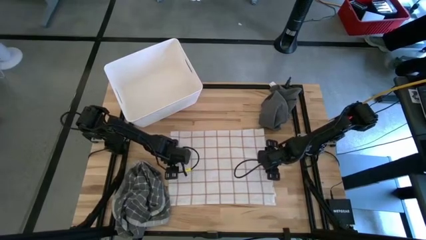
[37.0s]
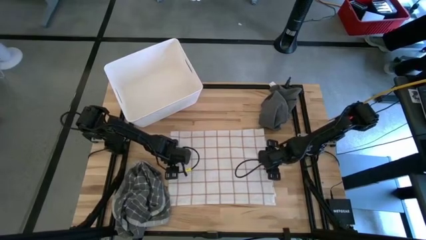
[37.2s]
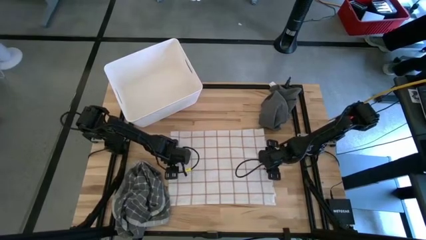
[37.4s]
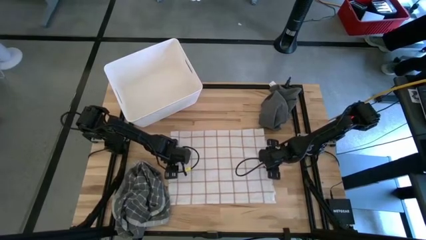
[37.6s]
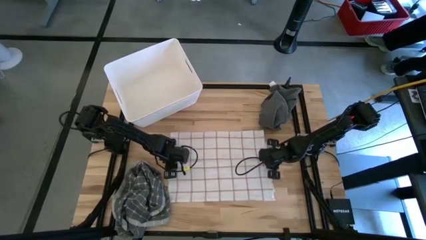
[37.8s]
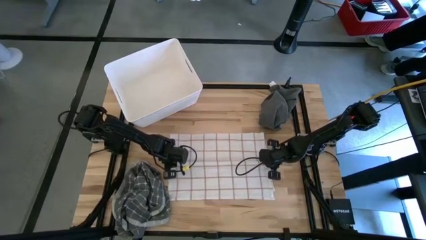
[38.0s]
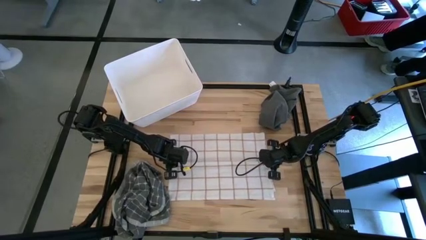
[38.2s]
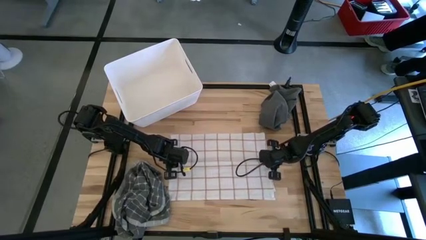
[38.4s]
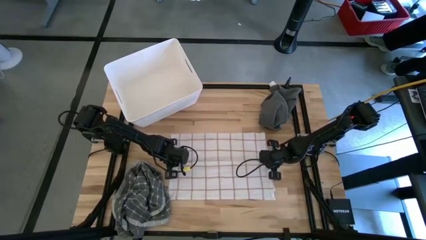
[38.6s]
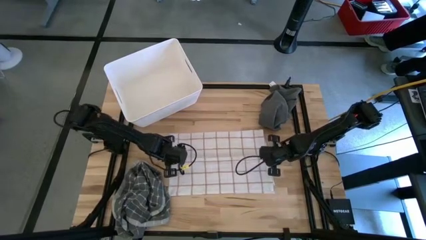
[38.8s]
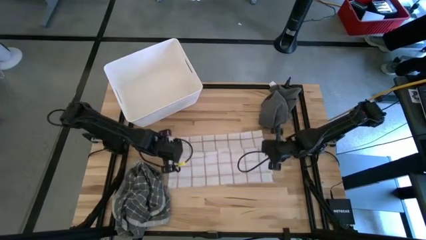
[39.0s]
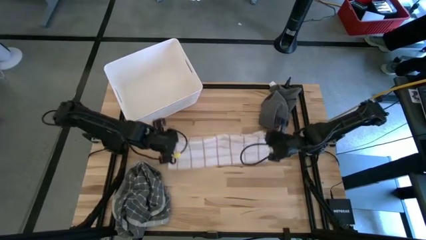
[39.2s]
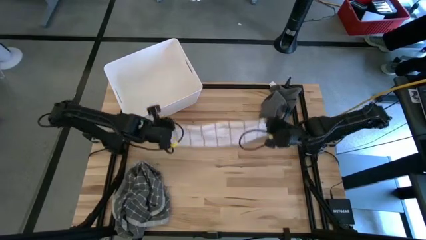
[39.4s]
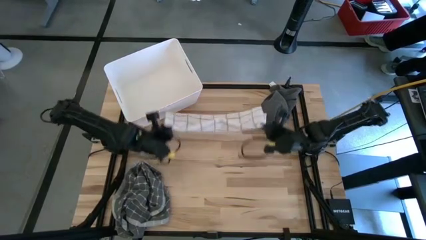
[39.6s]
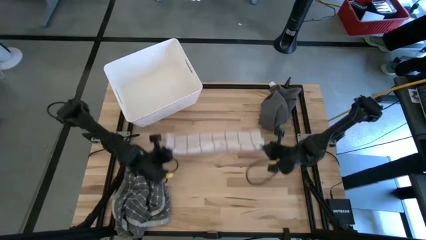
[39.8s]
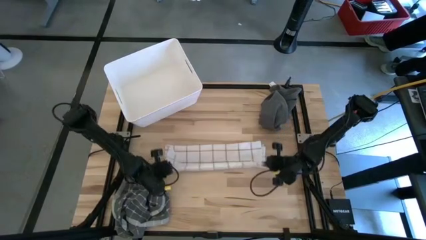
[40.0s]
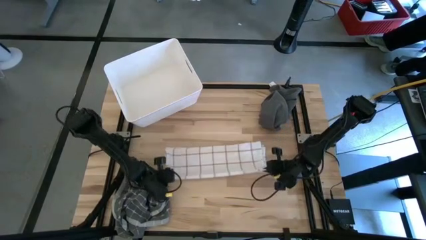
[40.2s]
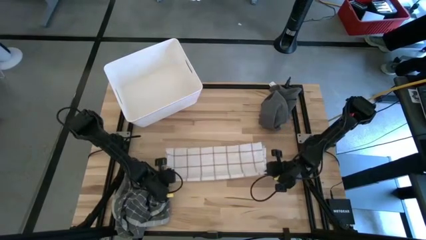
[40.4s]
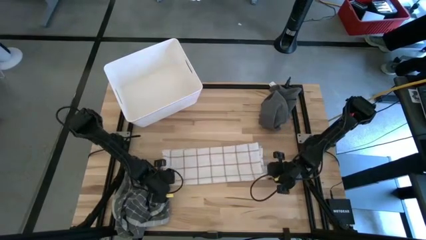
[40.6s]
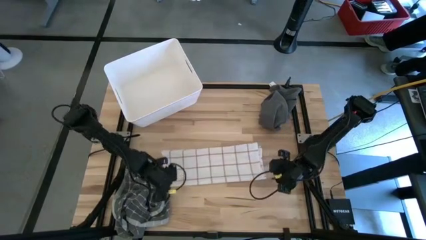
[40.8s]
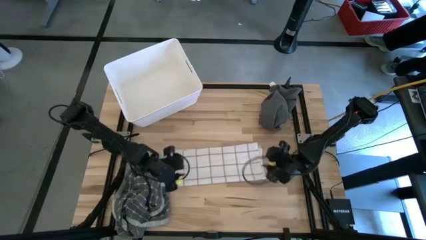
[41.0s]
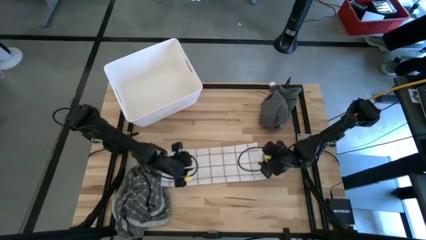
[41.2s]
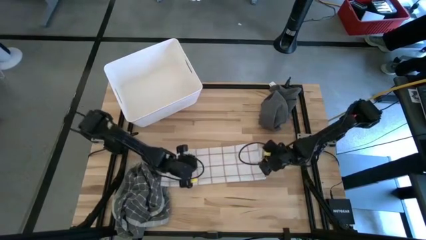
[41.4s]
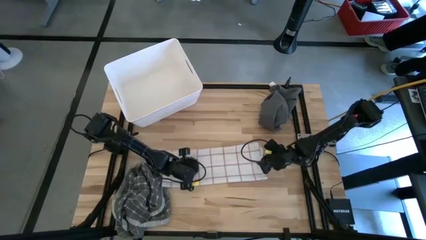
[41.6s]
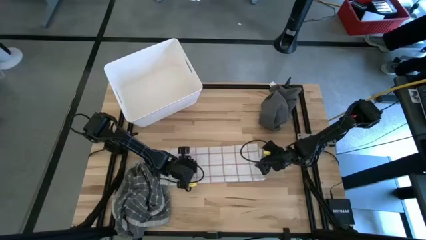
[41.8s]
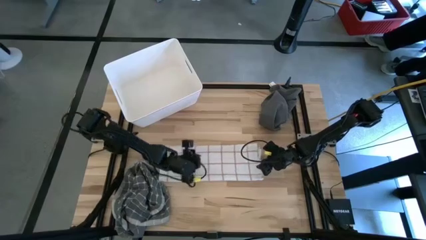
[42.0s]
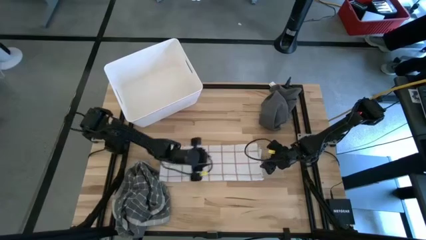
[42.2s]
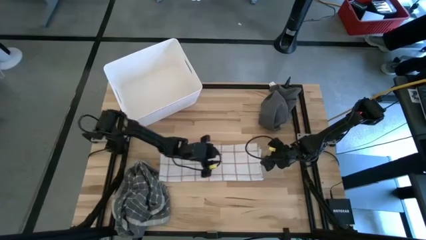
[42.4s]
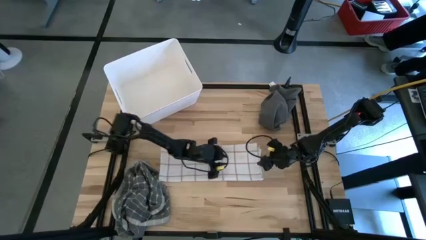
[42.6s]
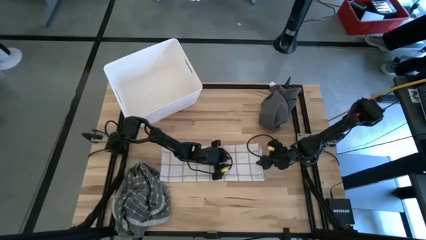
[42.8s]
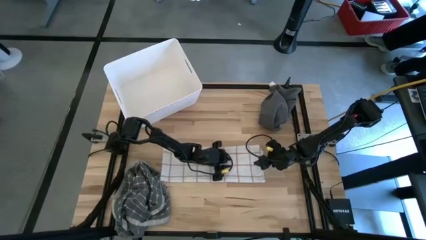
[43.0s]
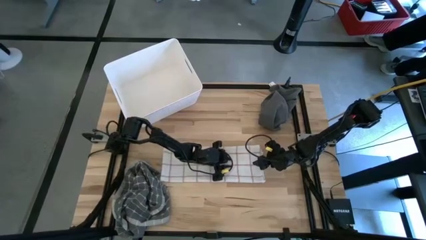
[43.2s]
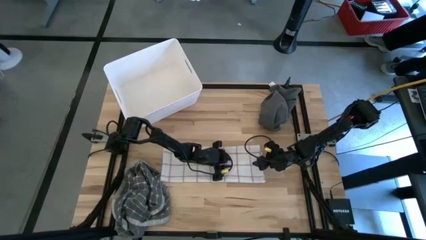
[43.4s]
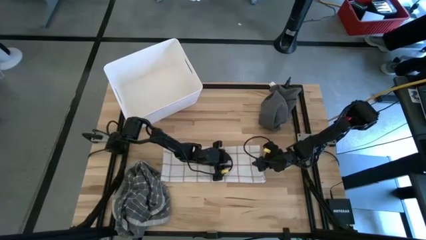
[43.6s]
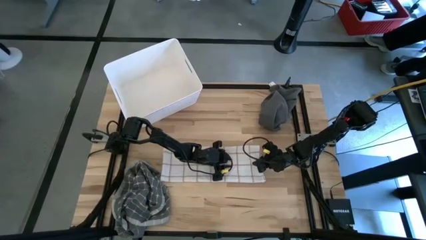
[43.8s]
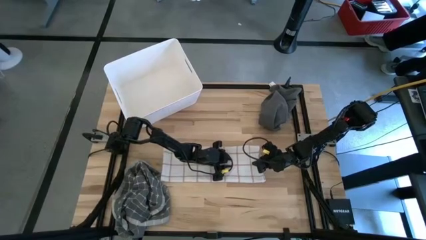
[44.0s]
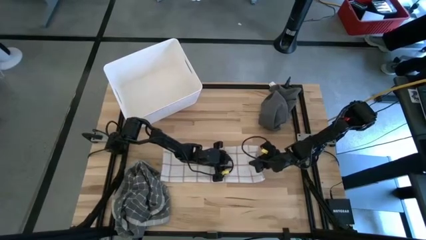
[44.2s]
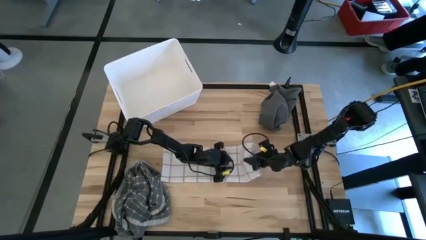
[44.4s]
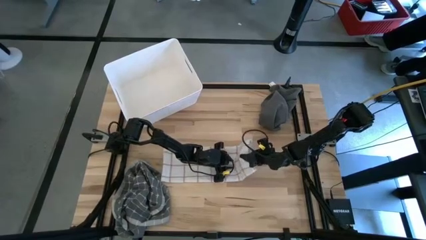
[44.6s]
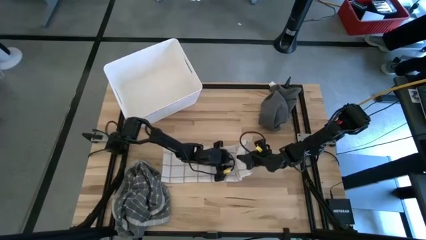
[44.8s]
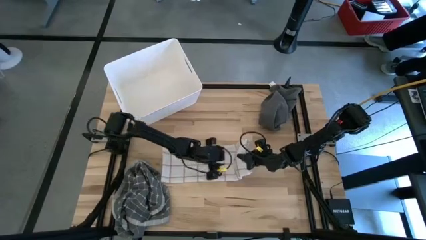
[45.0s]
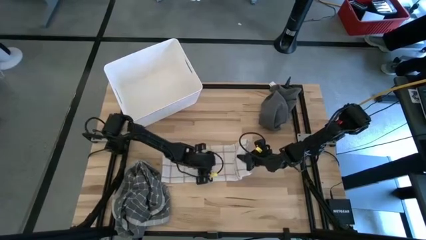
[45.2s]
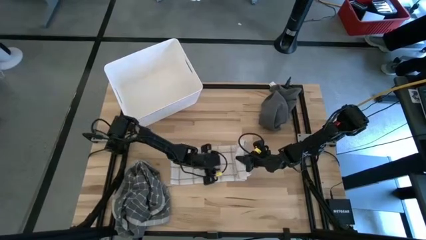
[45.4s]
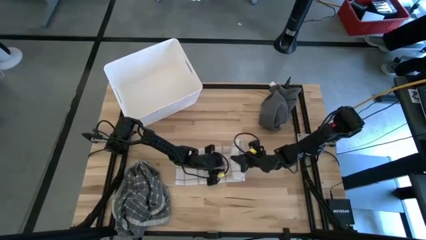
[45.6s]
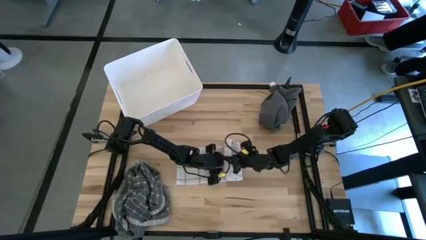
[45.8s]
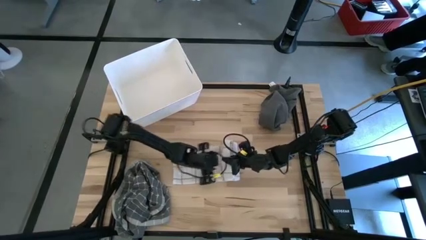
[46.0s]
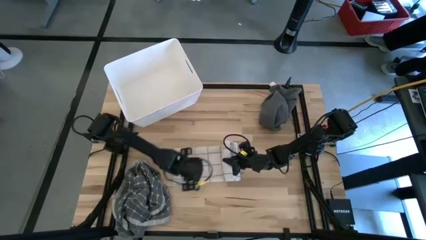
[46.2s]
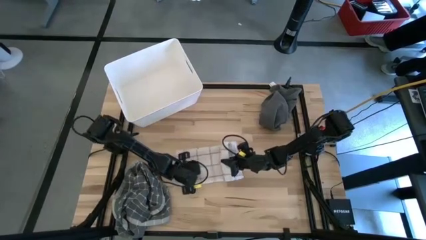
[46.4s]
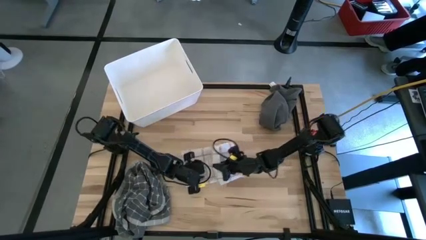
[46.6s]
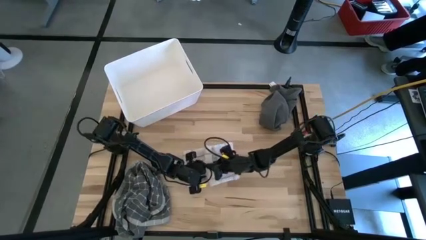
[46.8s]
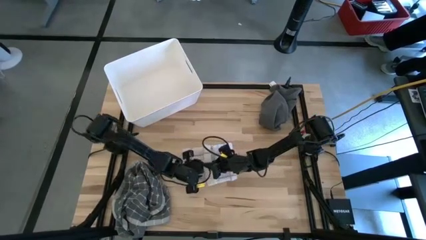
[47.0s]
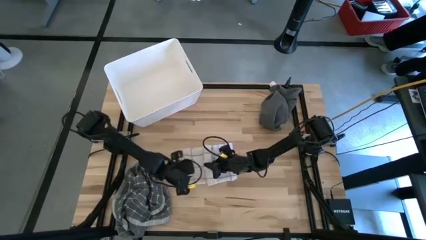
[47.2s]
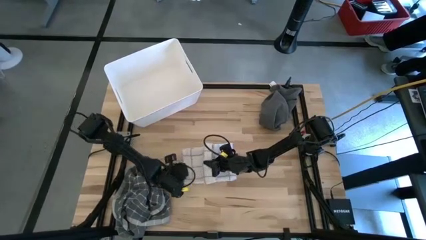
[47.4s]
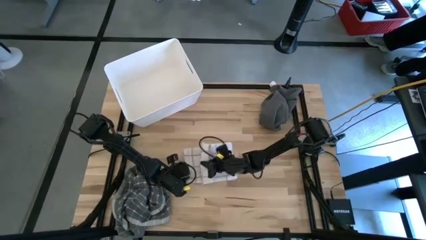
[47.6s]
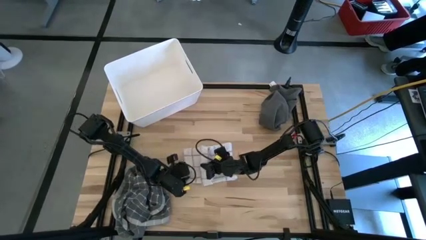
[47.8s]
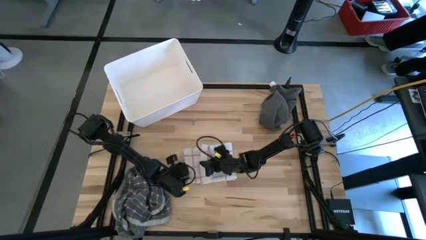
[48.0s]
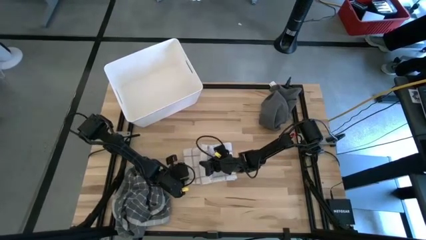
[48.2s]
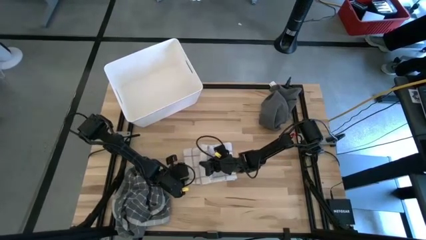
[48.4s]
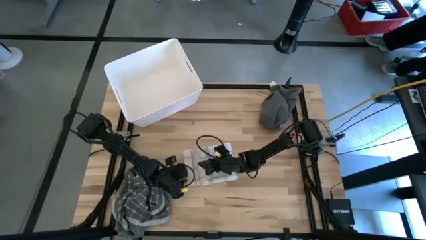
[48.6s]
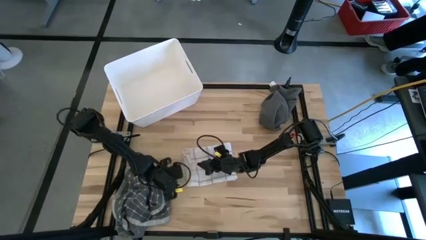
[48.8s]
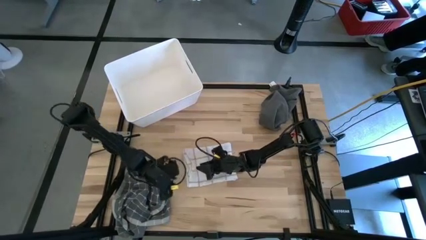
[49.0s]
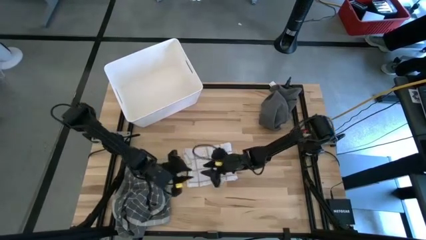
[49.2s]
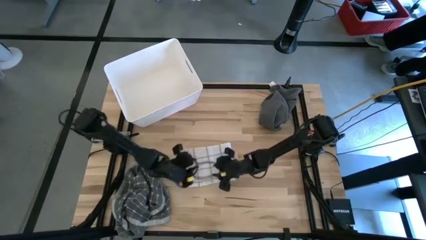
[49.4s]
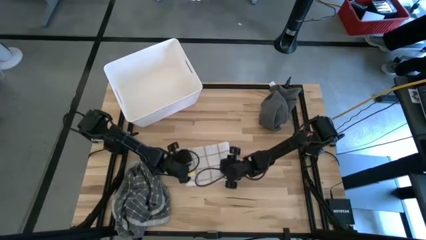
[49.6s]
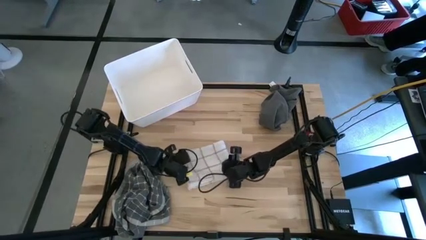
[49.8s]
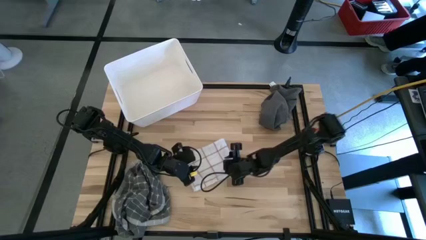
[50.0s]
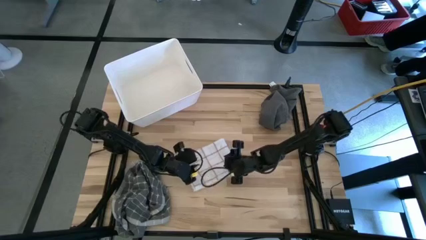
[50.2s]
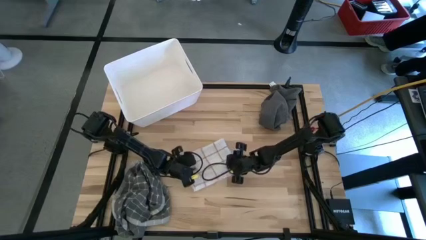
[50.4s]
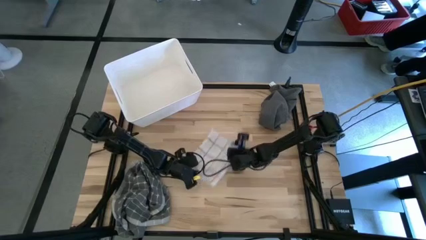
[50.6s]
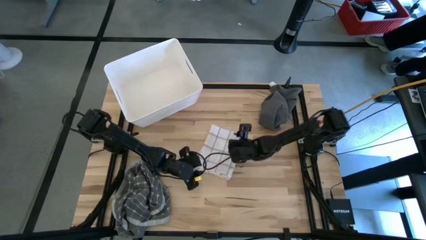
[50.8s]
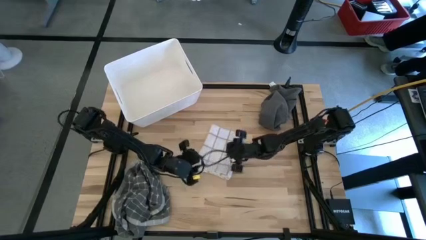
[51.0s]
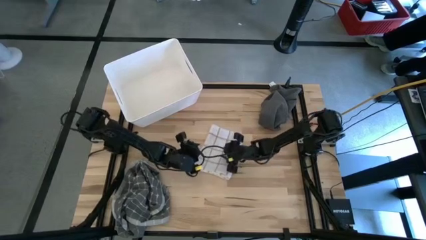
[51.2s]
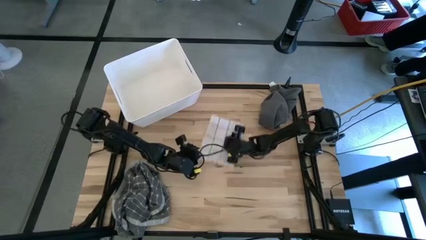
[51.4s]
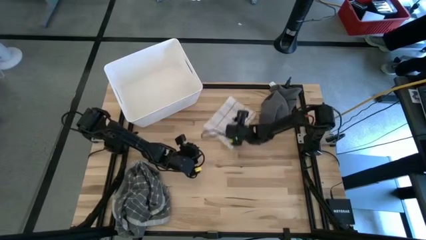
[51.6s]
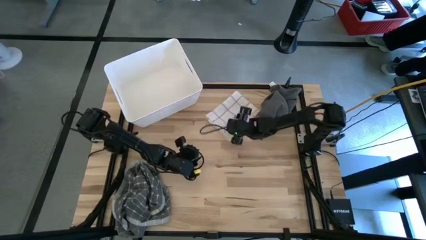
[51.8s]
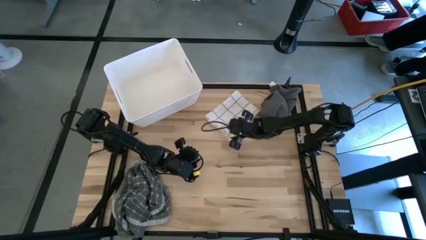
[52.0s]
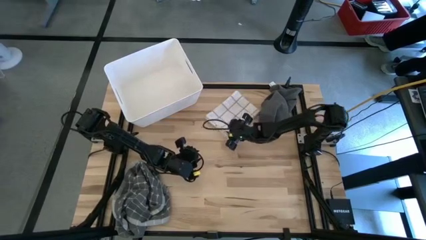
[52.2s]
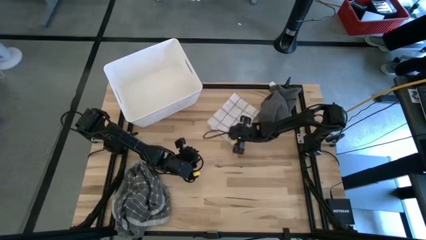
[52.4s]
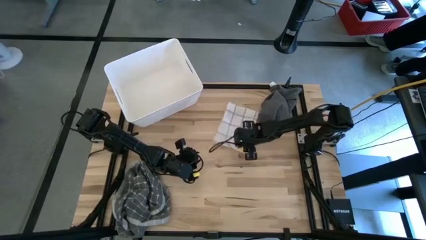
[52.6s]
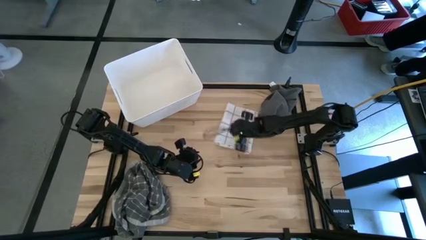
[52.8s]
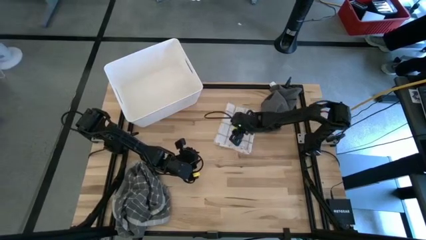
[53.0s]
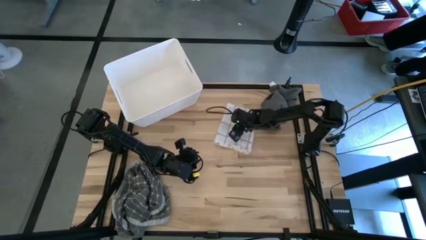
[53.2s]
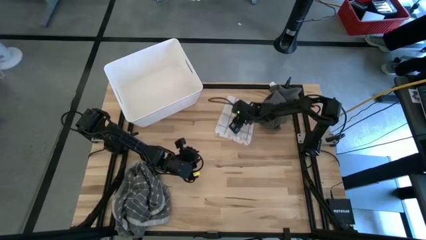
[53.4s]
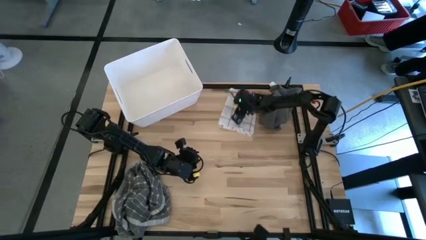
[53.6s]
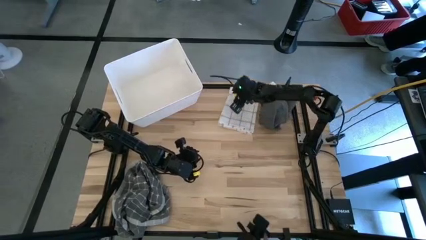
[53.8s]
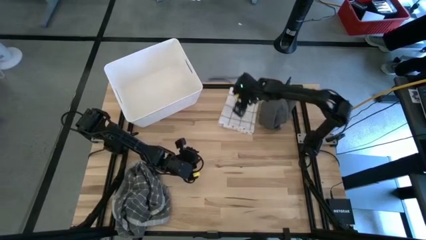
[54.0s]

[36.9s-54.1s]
Task: Fold towel
Fold the brown-white towel
